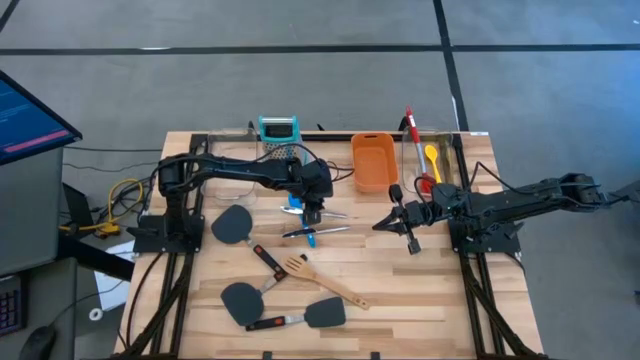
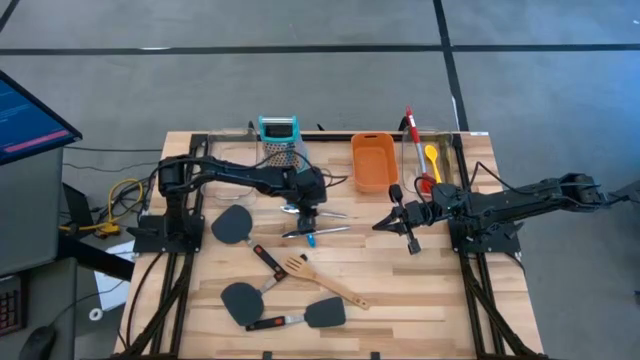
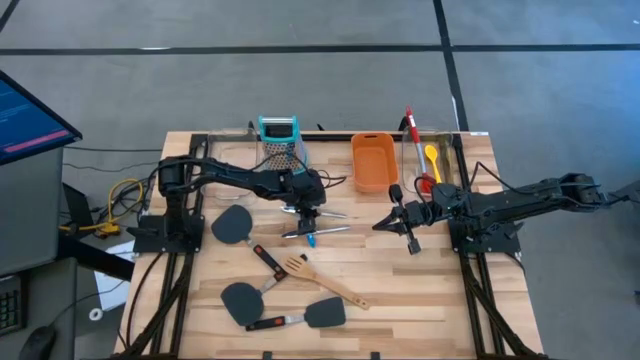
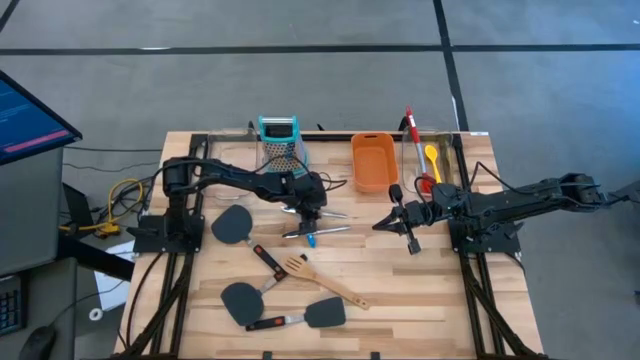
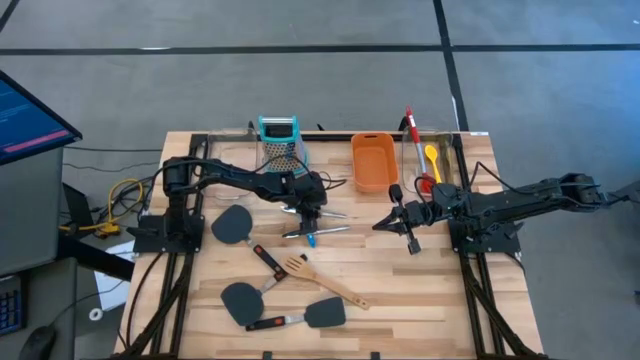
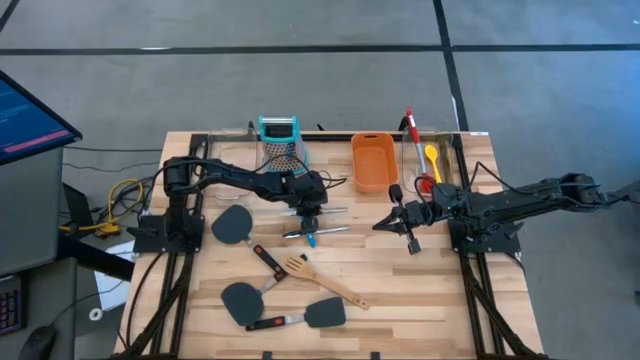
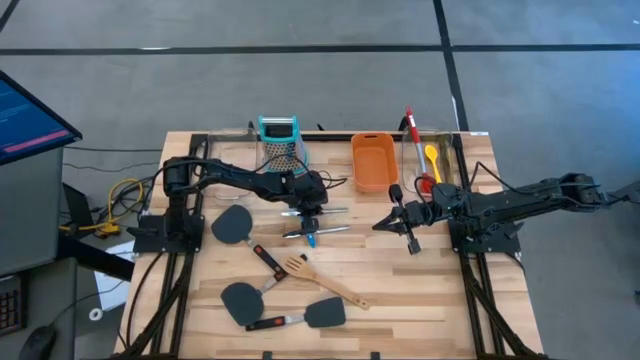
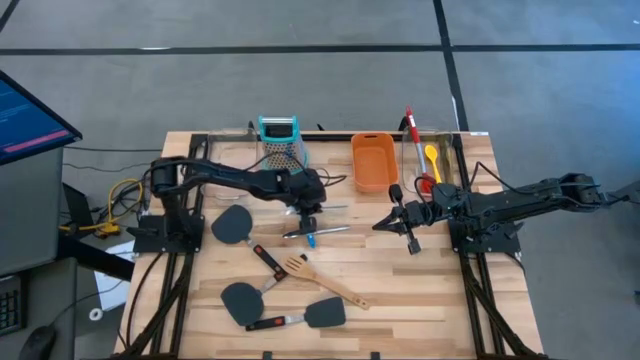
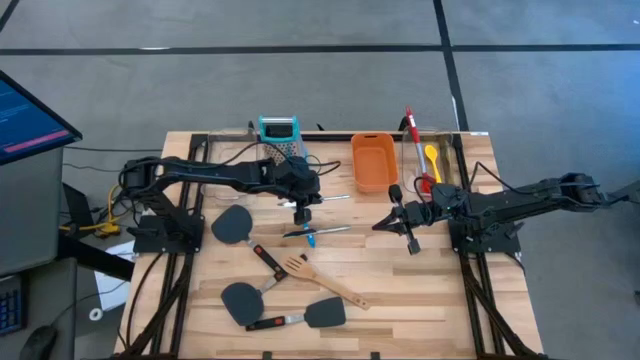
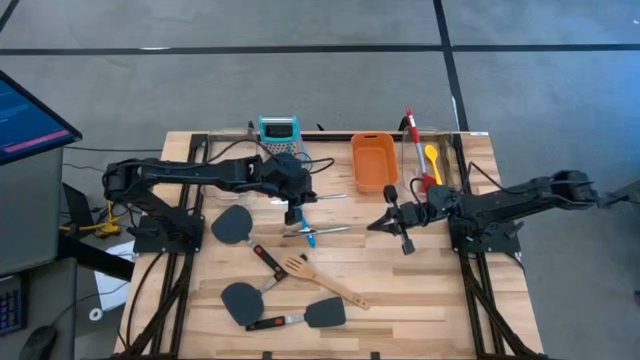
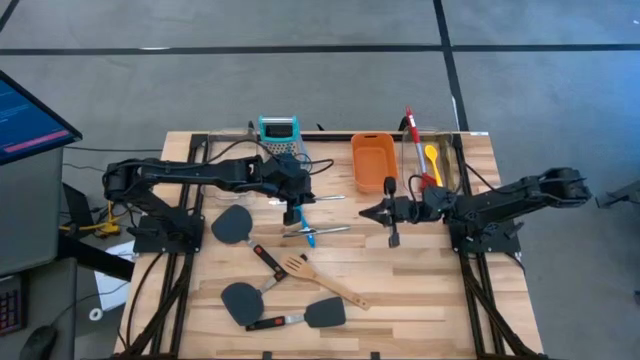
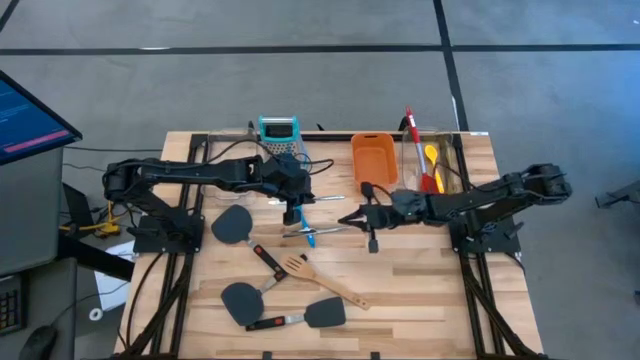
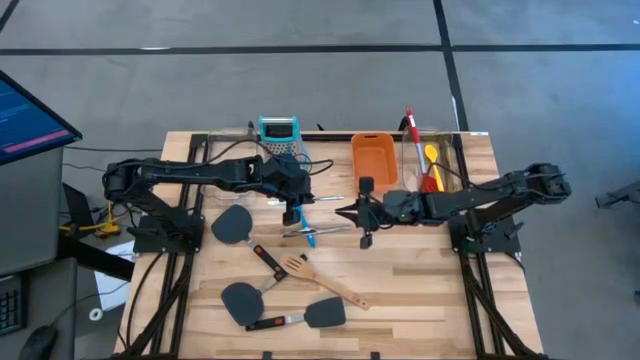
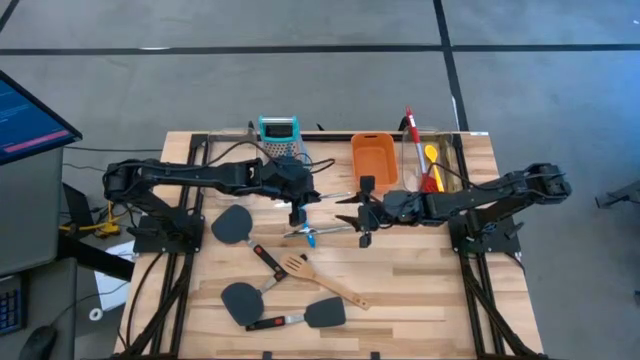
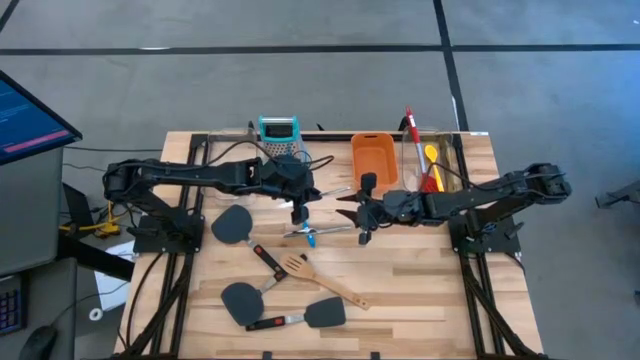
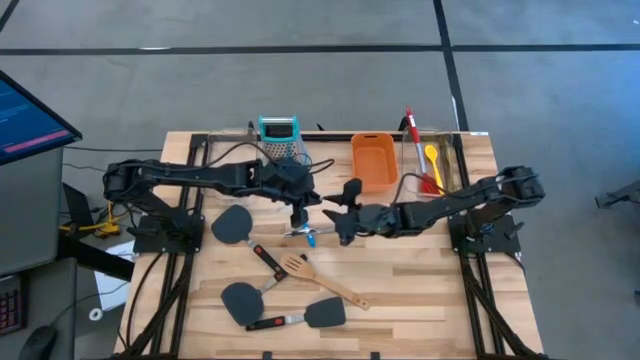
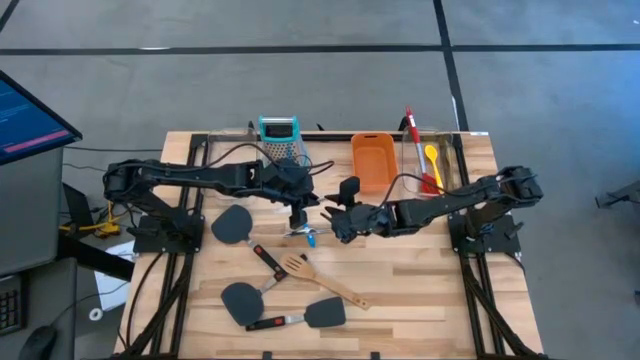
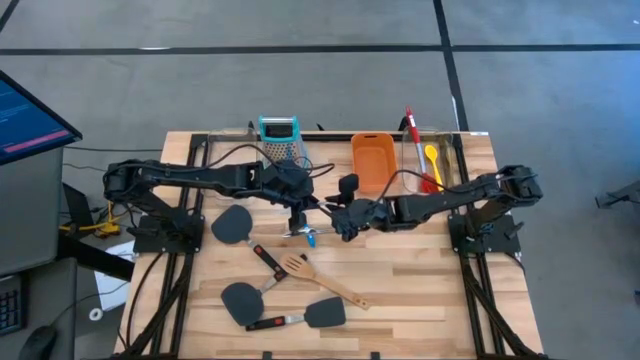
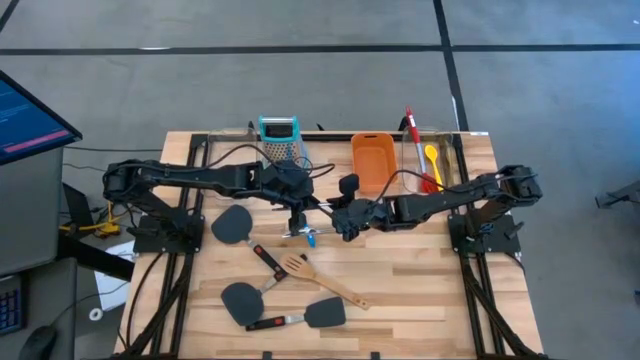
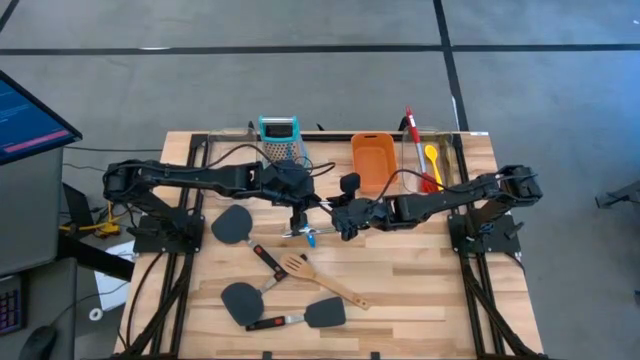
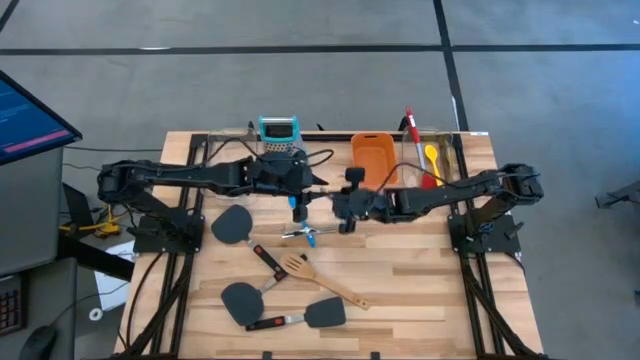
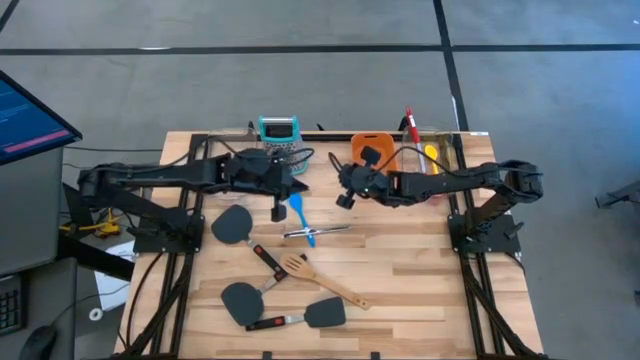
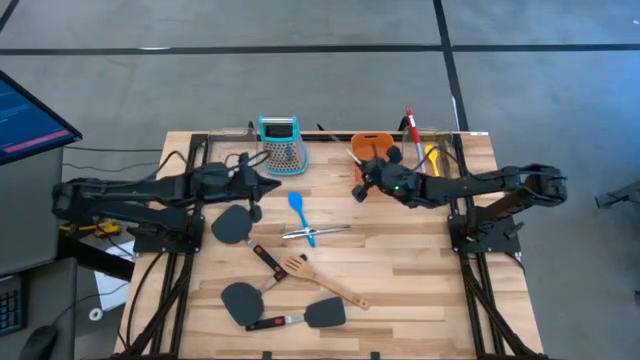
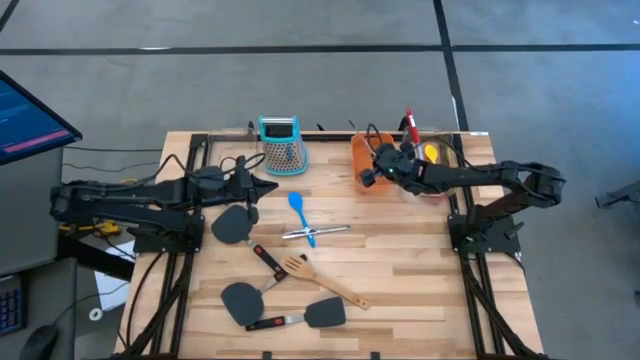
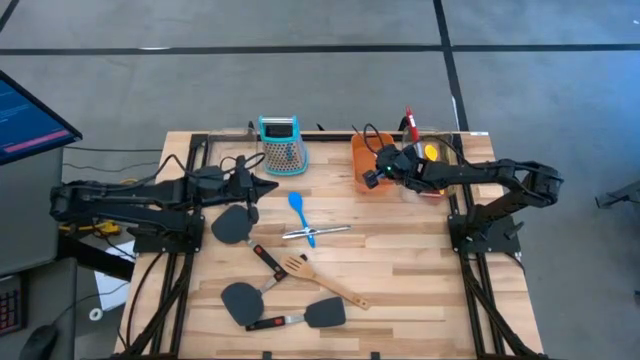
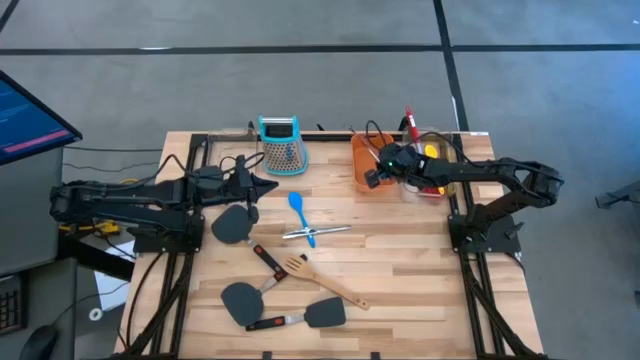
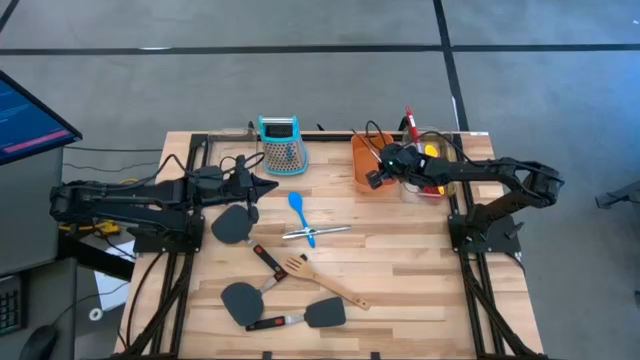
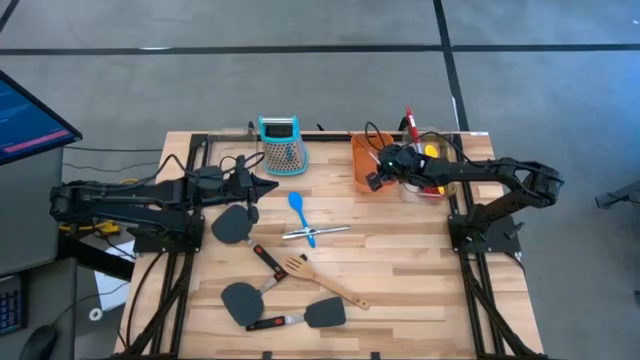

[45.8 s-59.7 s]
Task: Pick & Place Kitchen Items
Put the top silver kitchen knife into the orange bin

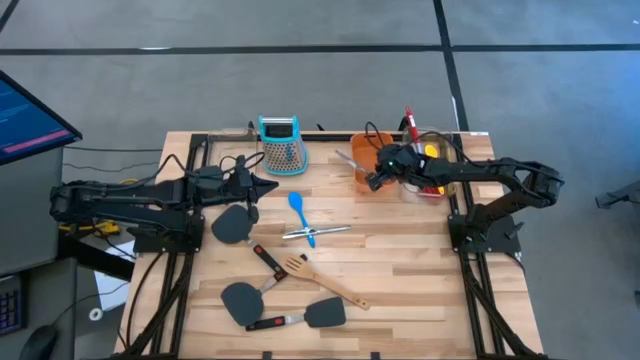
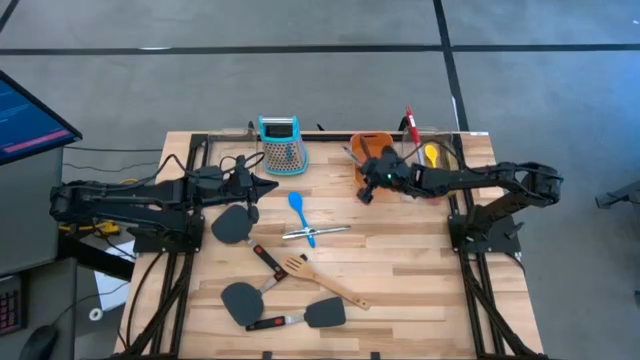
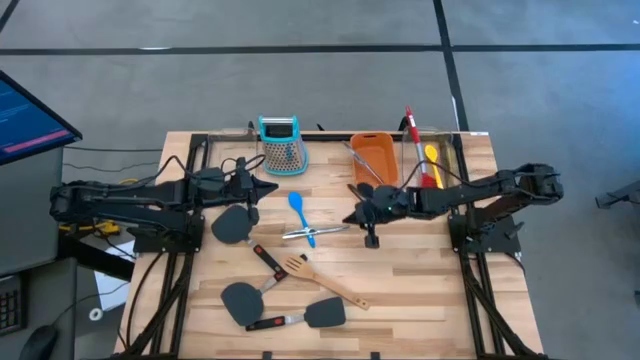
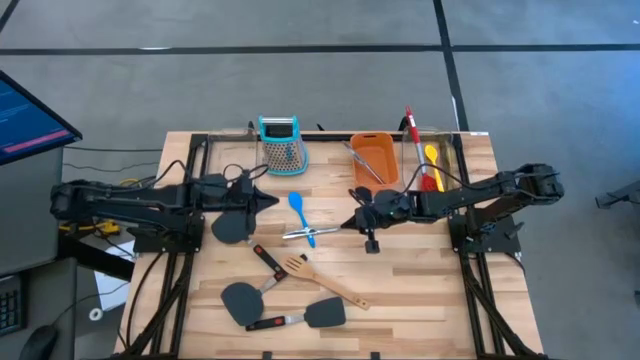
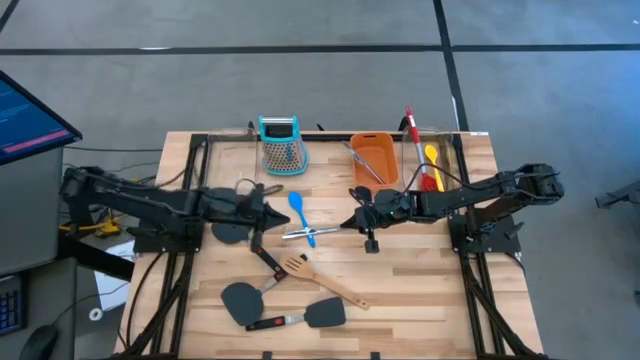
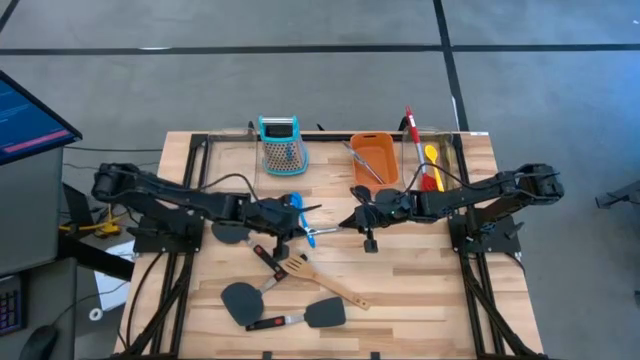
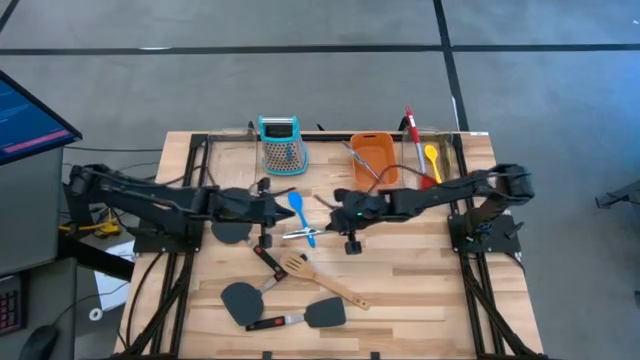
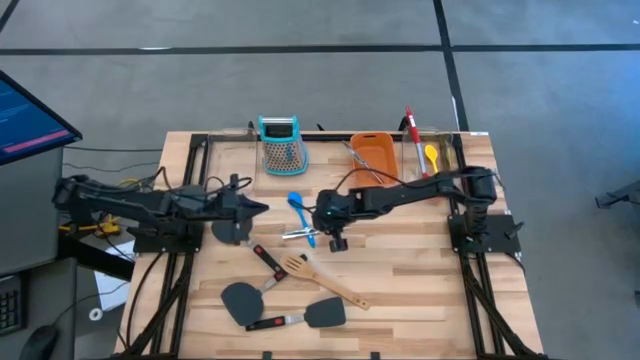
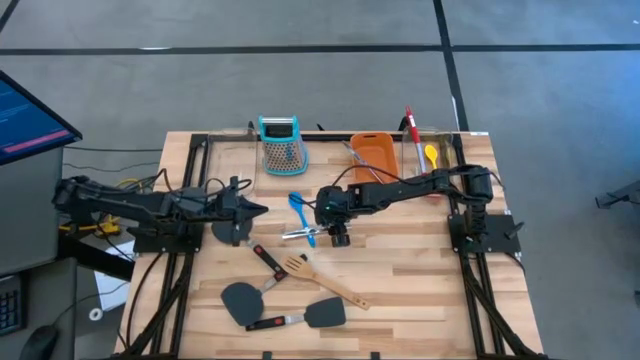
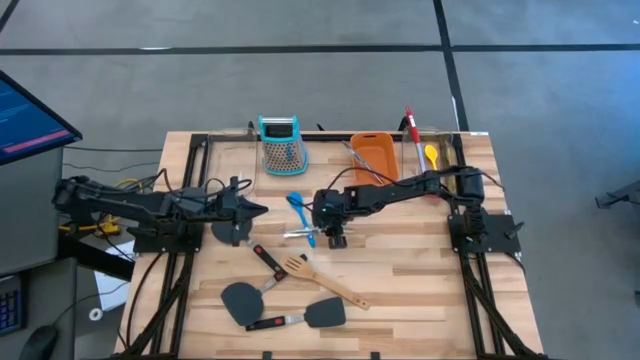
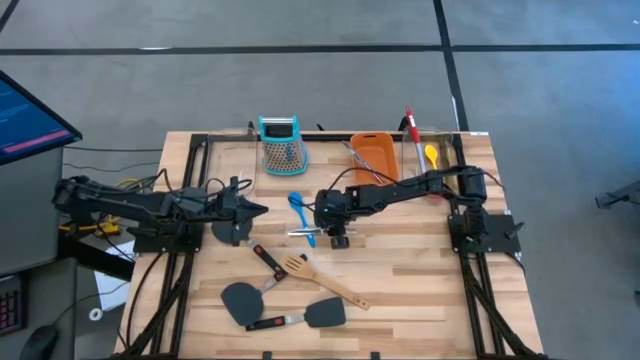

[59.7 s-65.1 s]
Put the silver kitchen knife into the orange bin

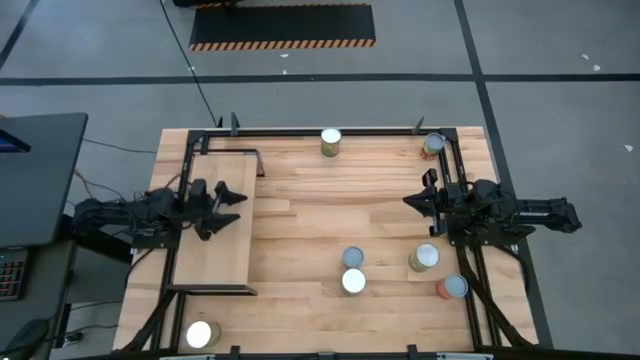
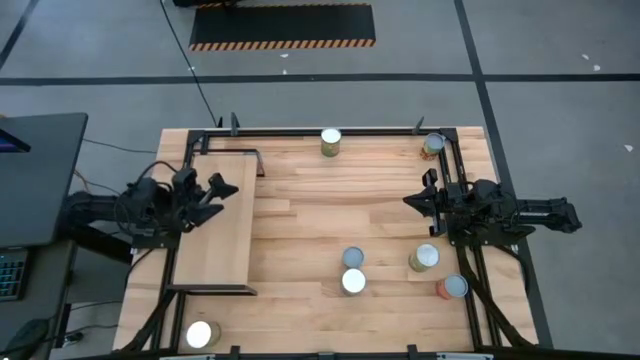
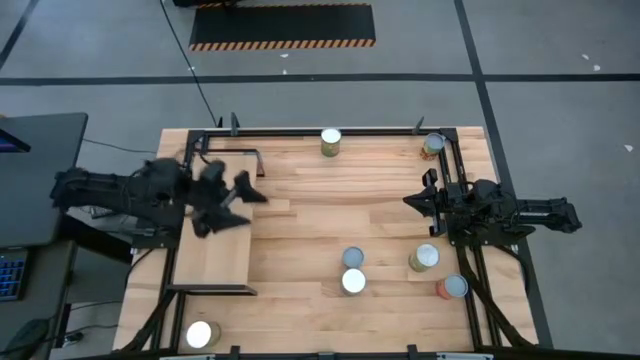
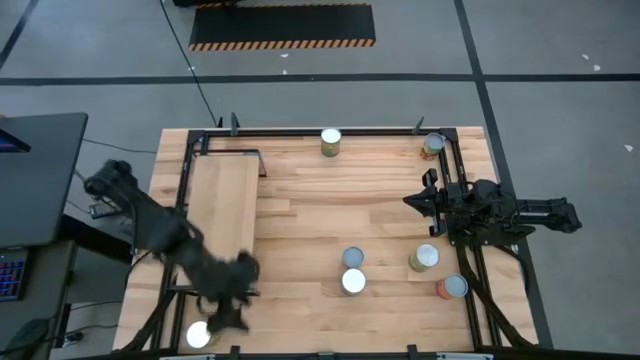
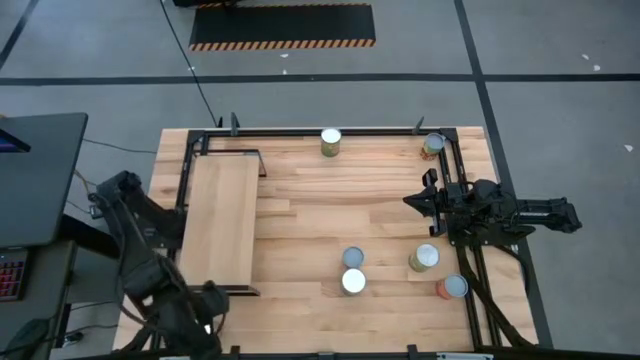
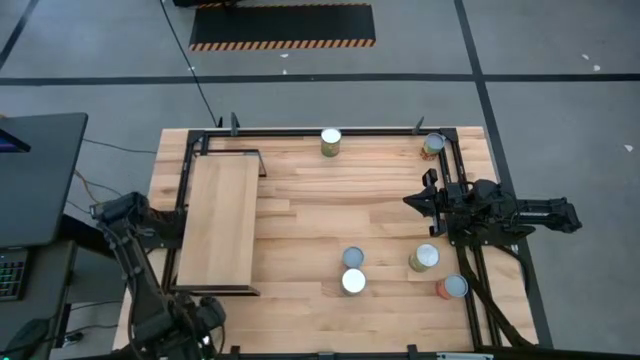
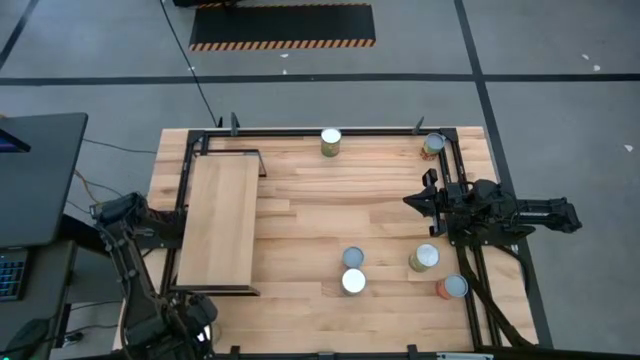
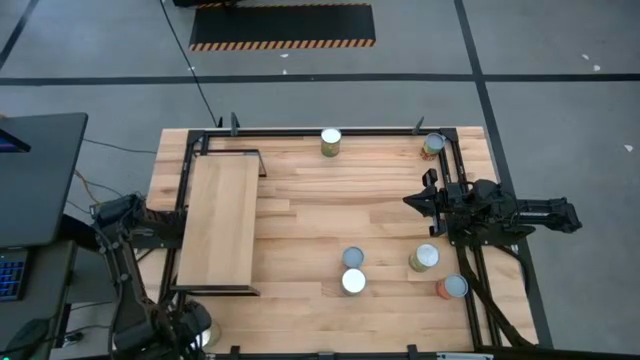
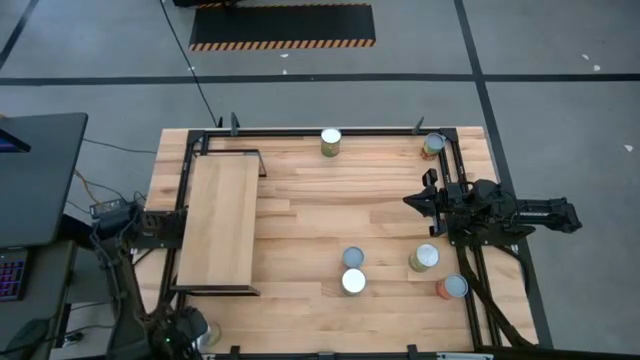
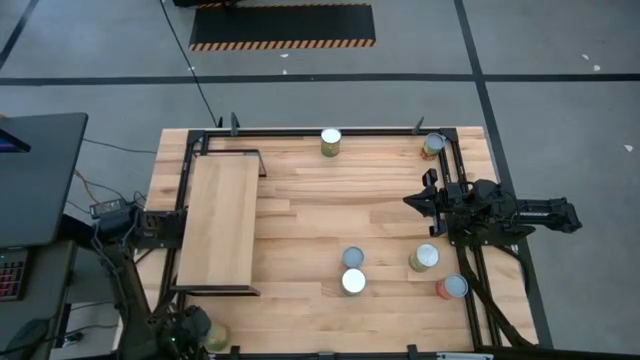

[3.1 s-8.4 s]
Task: Pick and place cans onto a shelf
Put the bottom large canned oranges on the shelf
